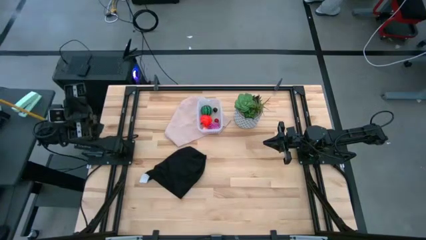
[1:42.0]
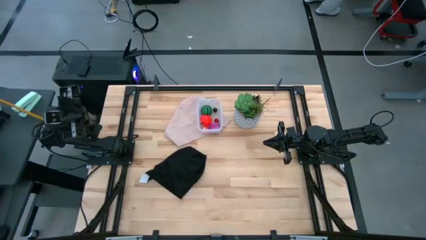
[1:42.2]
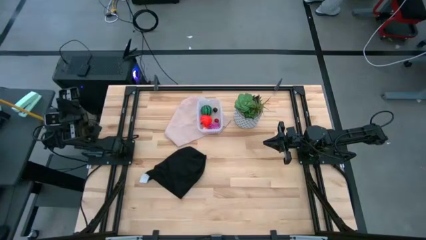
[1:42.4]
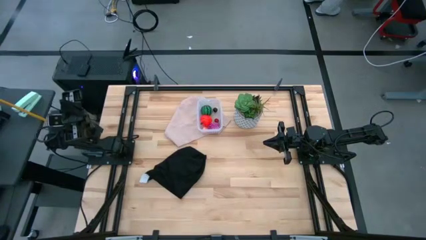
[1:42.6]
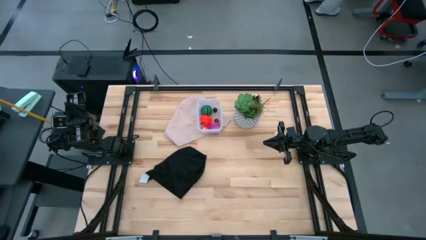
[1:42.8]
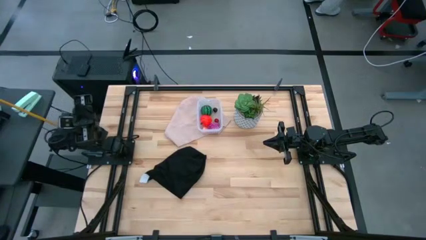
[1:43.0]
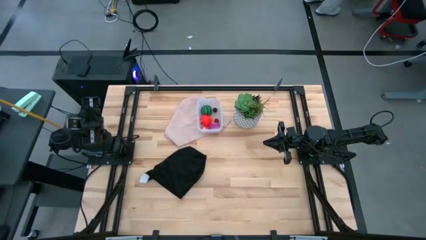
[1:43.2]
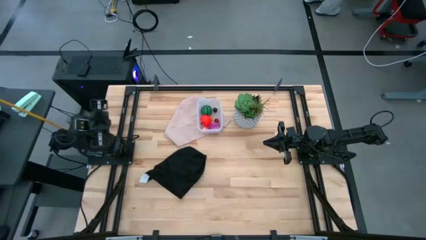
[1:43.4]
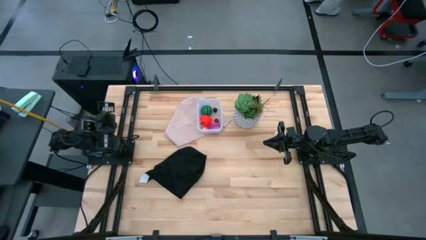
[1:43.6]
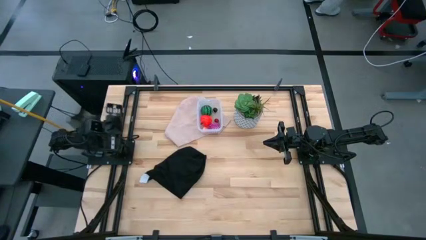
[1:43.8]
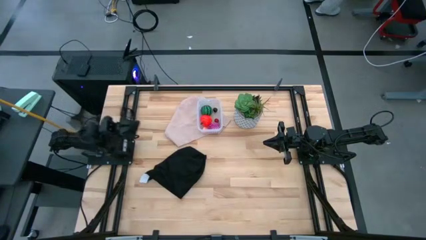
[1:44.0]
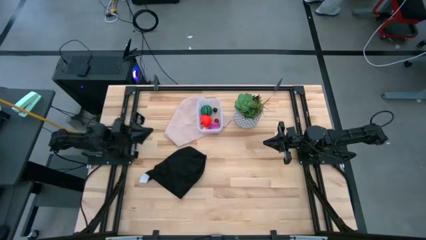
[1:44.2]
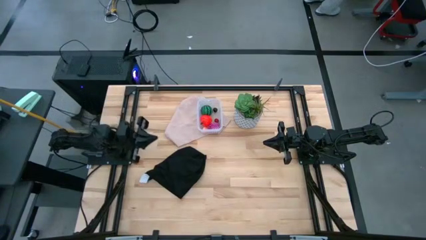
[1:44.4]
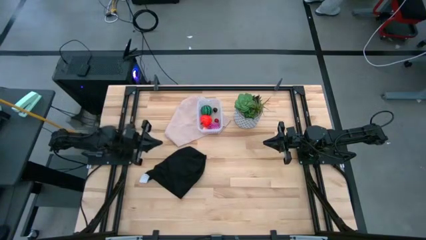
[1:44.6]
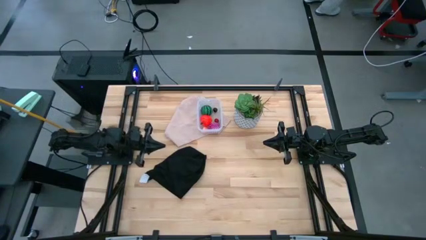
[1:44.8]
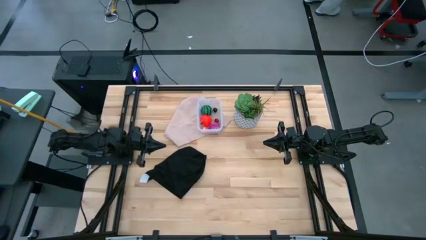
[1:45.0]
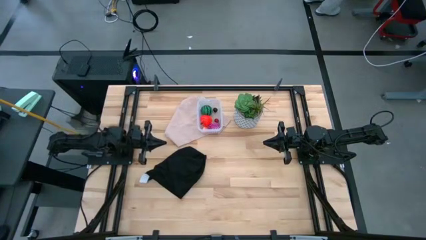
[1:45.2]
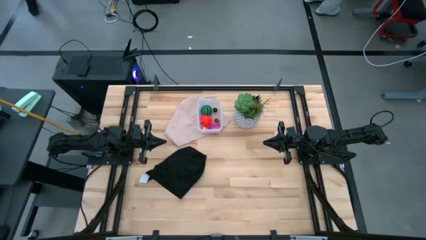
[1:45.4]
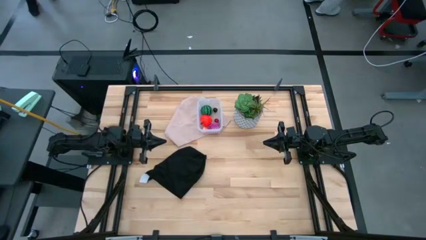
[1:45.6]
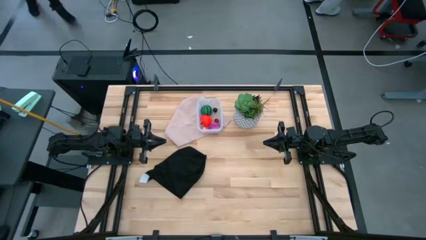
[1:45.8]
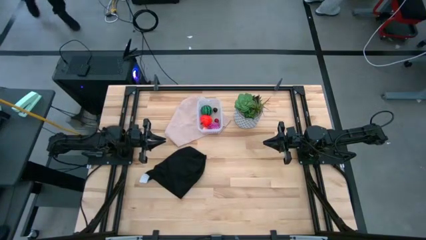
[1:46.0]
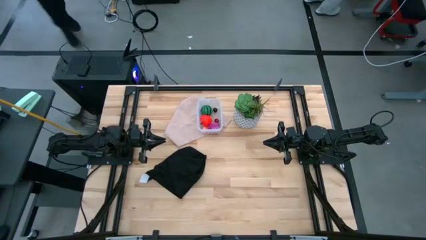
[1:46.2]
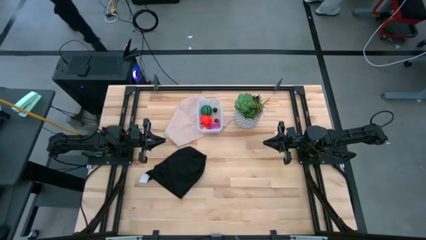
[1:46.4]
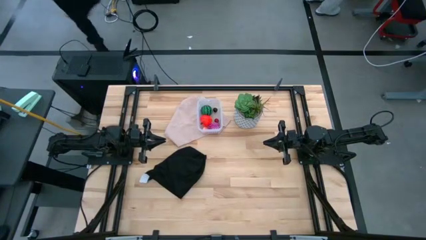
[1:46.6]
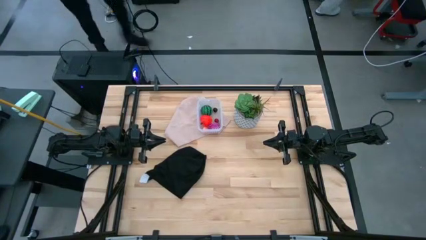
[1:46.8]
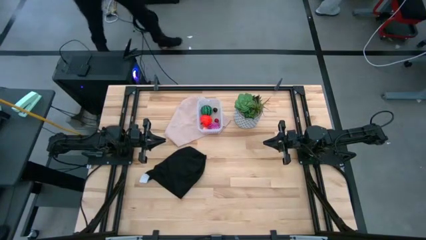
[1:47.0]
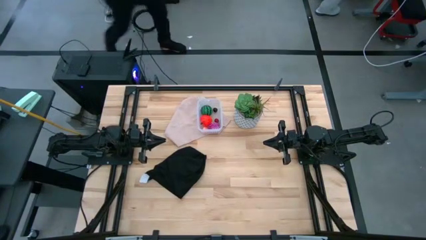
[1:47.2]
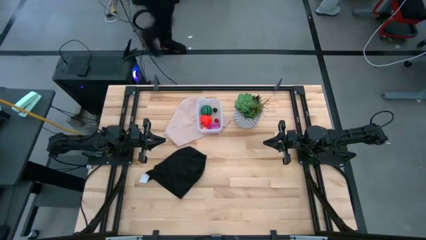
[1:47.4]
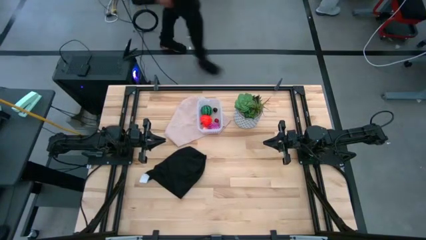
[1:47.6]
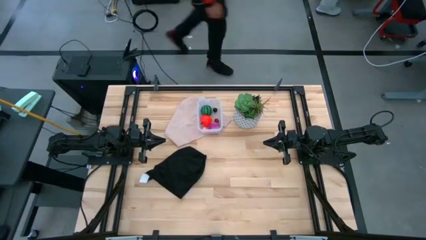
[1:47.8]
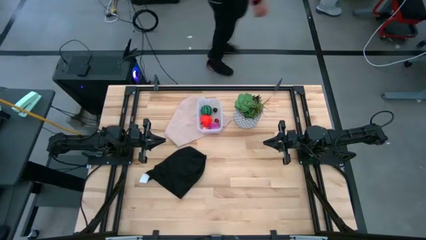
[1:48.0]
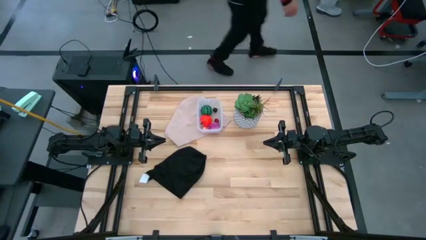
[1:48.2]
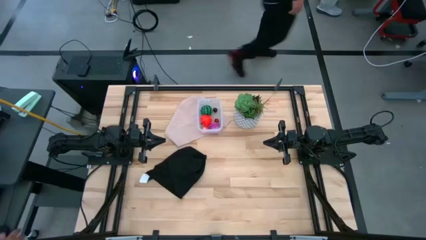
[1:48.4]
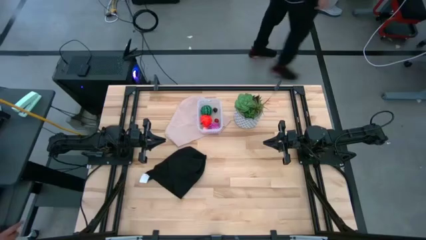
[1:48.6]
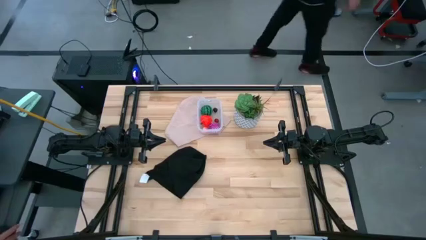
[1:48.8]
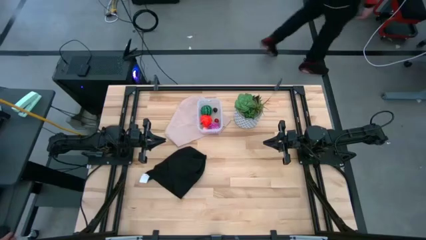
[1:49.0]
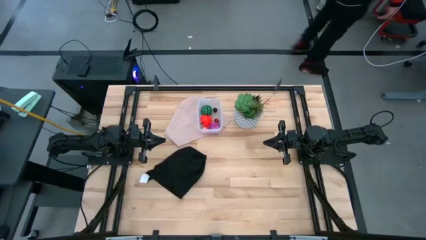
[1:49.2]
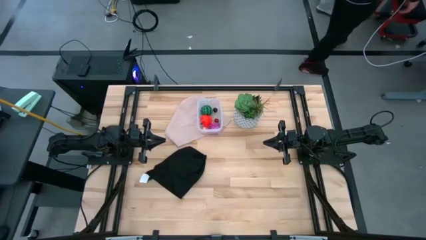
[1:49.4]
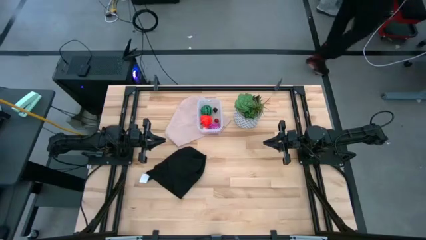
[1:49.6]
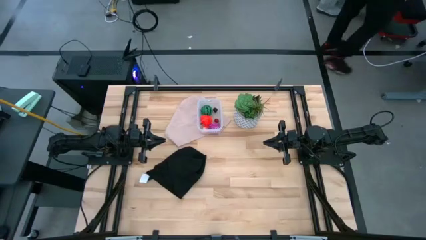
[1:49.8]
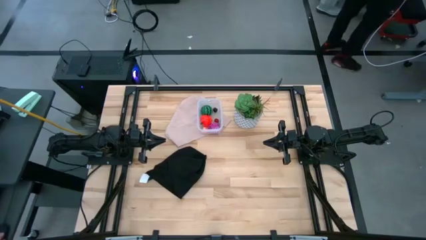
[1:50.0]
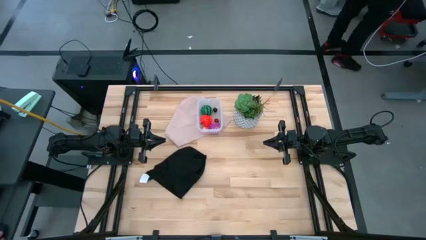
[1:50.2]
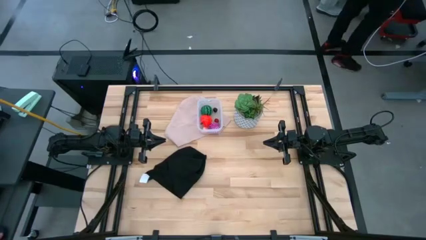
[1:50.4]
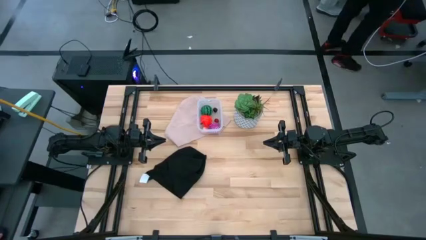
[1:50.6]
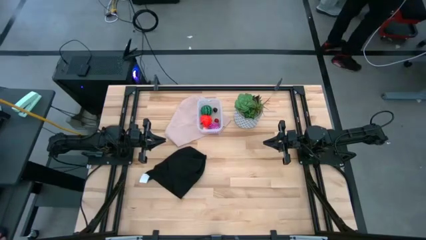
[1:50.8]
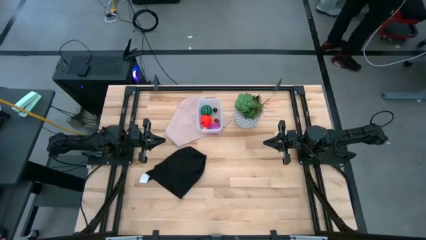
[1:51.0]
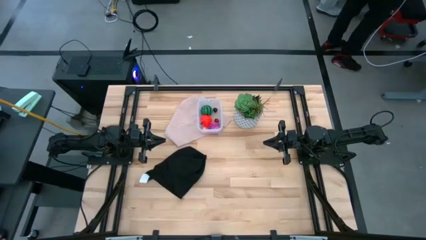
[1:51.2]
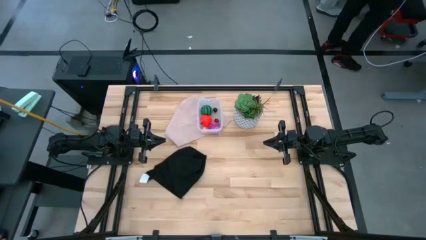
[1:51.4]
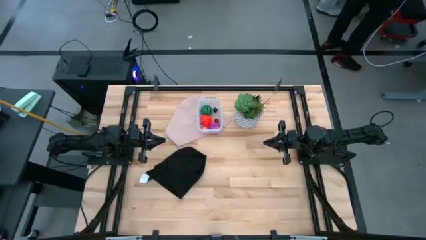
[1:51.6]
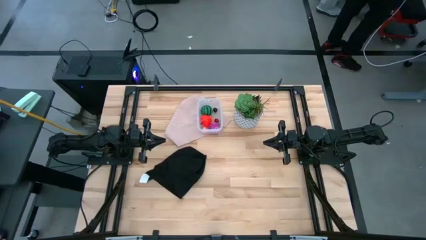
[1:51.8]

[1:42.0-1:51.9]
Task: Pick and placing Produce into tupperware
Return to Home Position

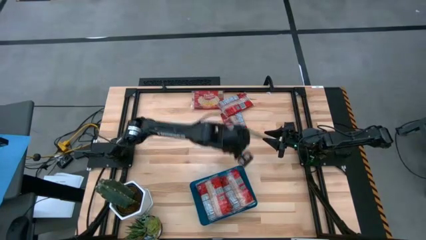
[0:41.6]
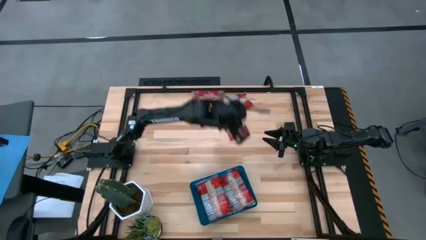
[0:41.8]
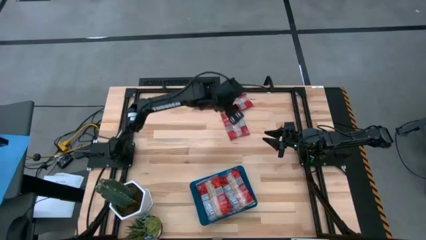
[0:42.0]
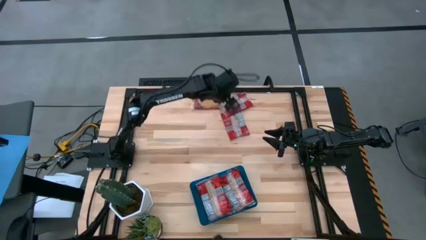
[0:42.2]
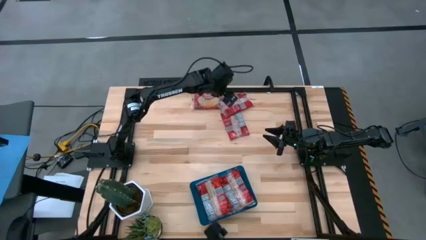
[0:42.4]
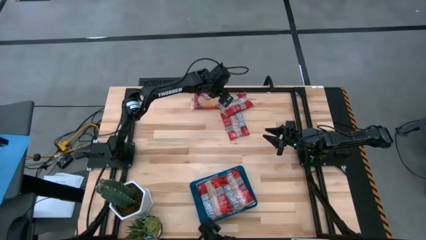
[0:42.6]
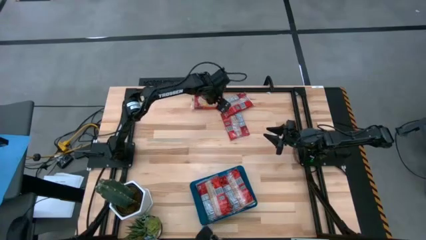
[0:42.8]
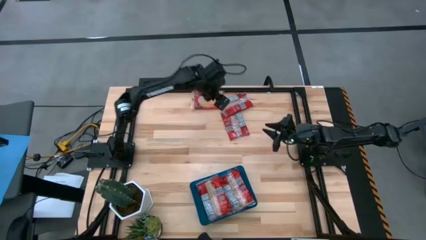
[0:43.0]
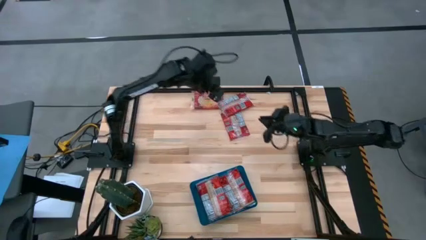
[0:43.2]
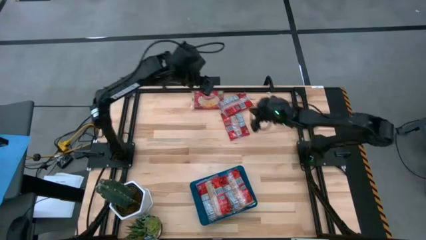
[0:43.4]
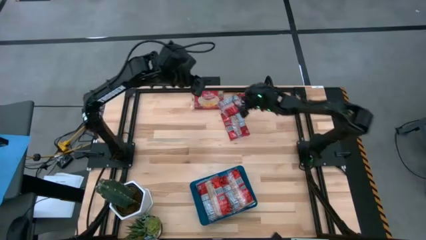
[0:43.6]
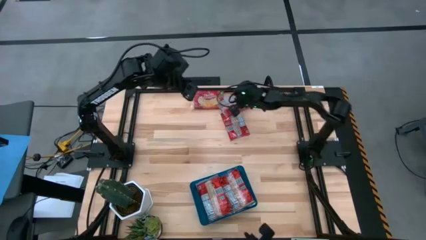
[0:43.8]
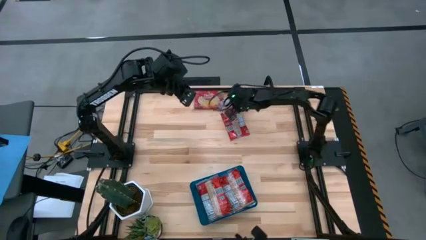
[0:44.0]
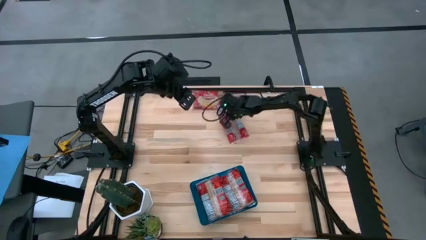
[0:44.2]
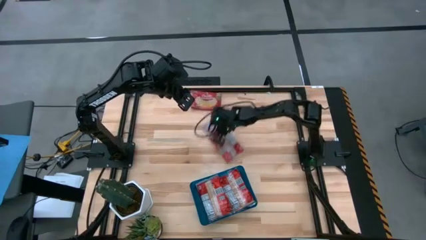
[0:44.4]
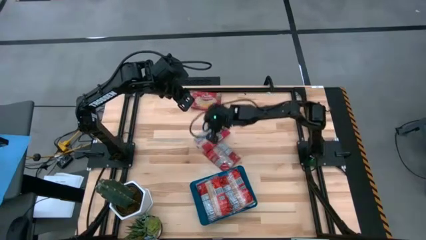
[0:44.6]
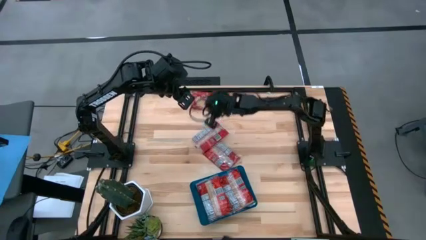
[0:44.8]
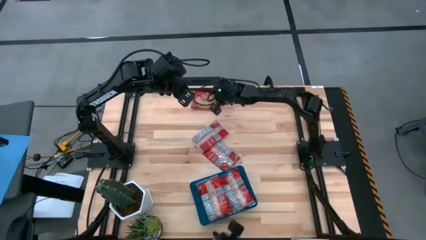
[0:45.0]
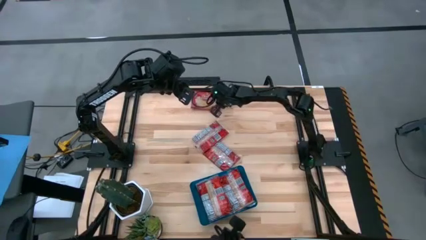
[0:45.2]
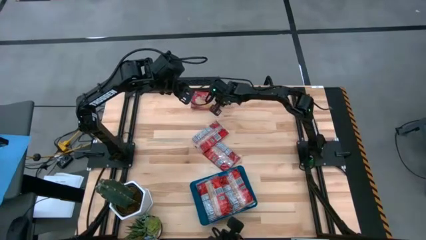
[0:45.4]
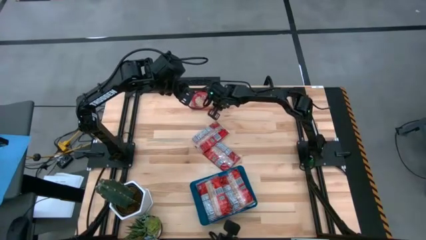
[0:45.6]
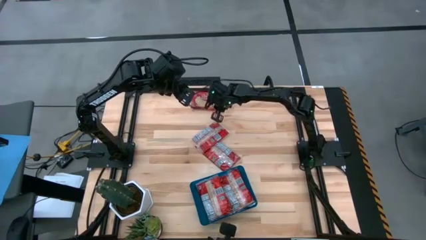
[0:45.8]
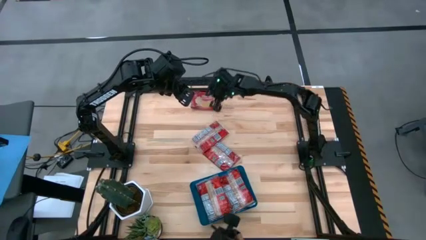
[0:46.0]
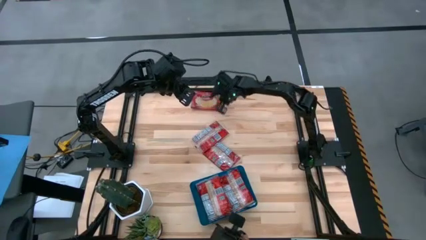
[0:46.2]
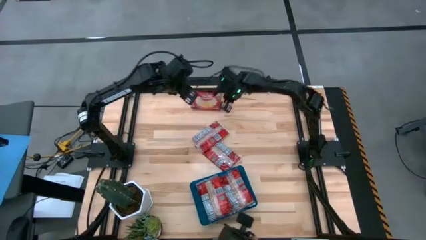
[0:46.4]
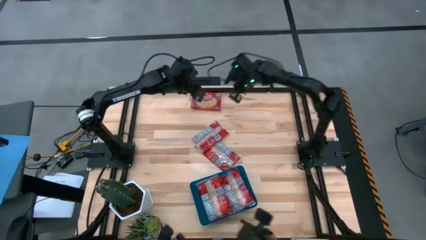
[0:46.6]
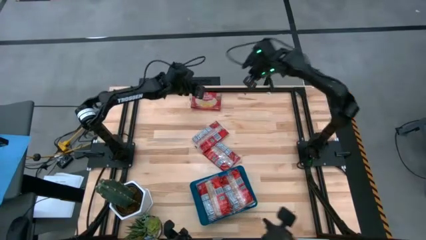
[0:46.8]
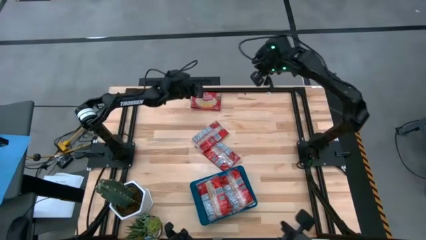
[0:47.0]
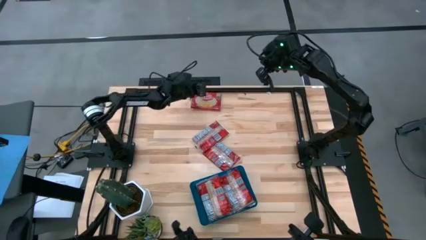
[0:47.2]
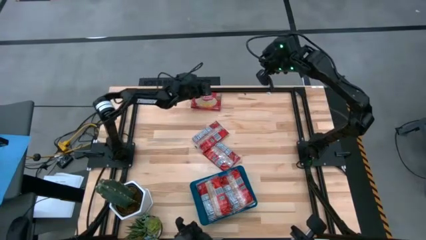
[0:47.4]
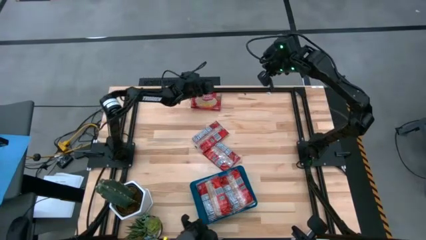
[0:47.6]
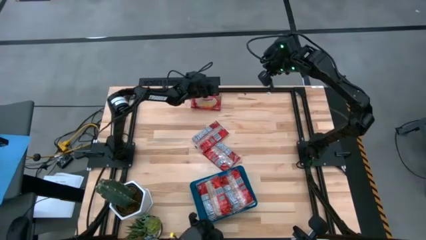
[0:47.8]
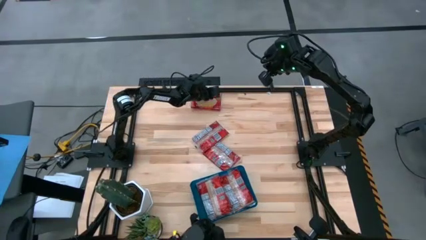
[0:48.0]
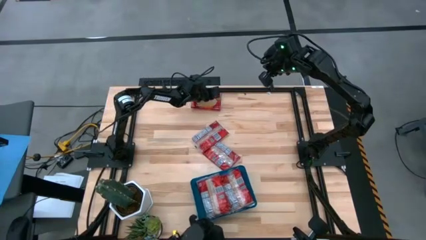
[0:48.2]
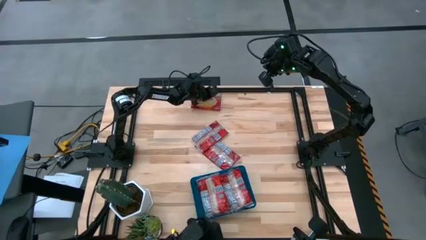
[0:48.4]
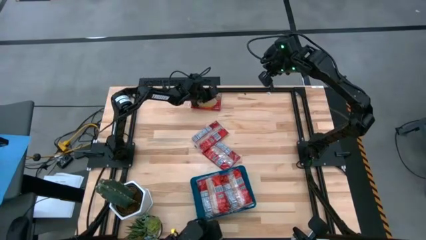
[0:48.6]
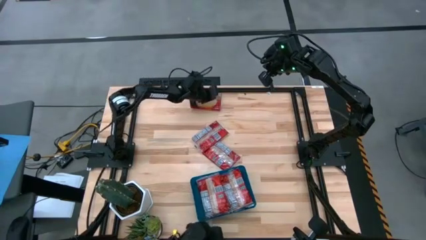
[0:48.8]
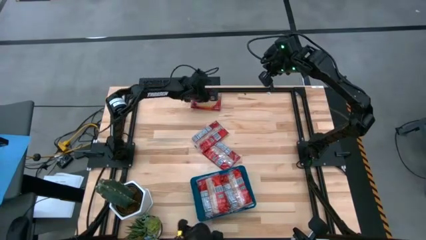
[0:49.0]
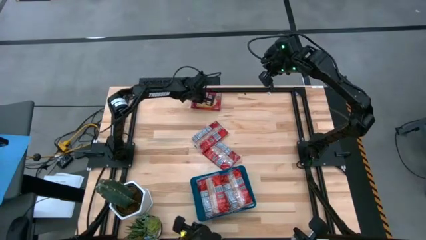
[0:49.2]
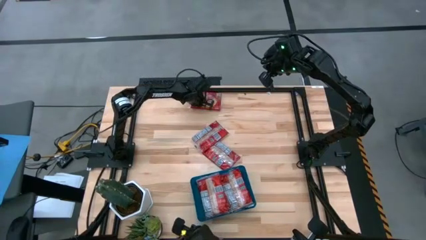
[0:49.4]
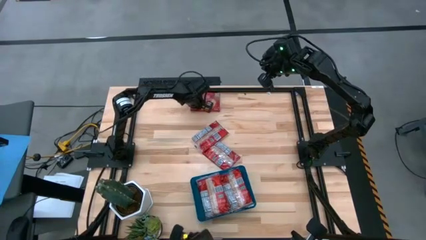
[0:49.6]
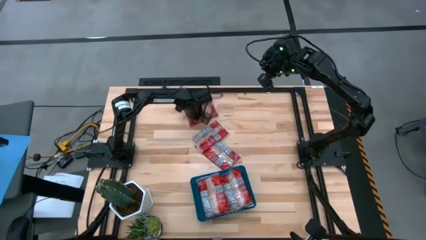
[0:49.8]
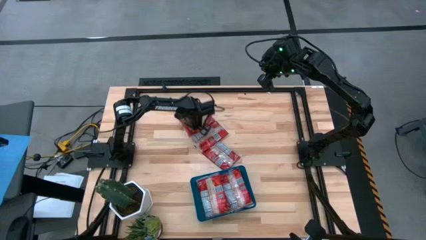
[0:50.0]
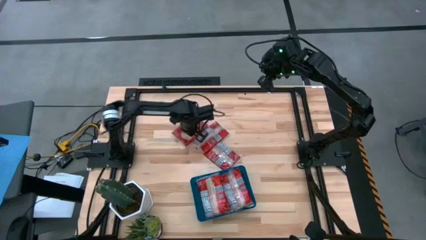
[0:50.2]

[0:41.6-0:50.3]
Task: Sort popcorn bags into baskets
Move the popcorn bags to middle of the table
